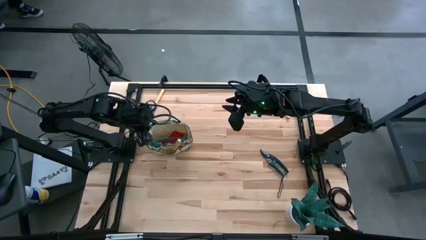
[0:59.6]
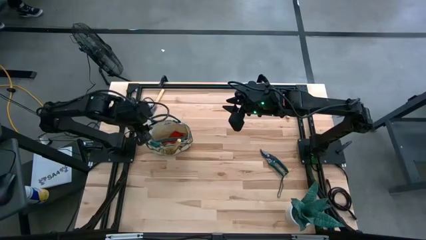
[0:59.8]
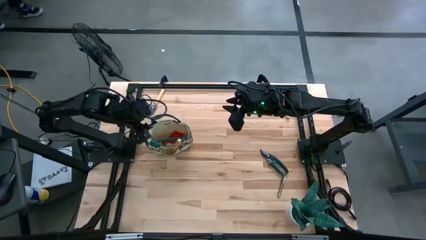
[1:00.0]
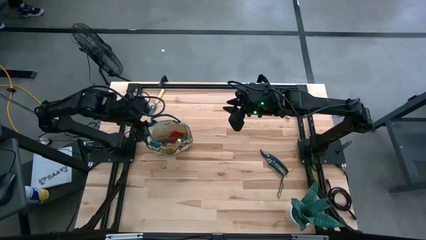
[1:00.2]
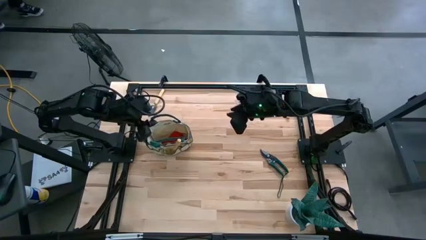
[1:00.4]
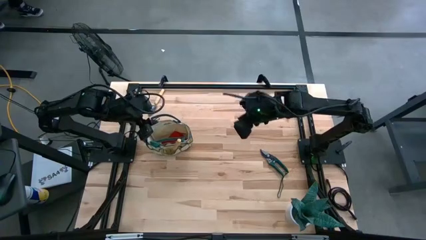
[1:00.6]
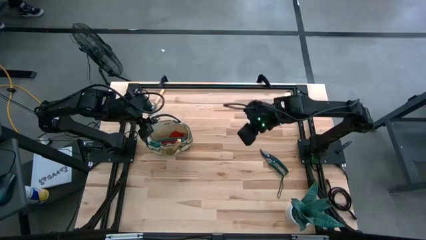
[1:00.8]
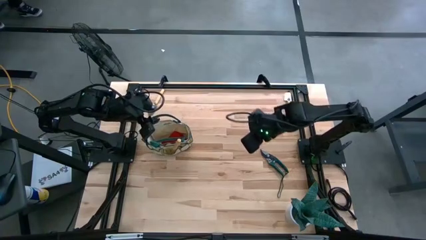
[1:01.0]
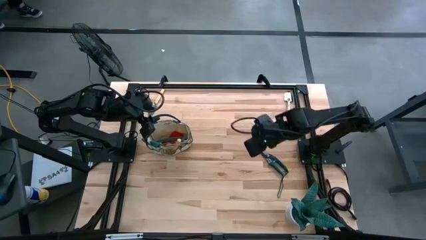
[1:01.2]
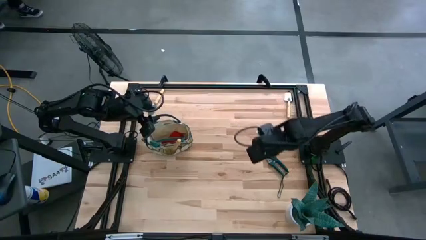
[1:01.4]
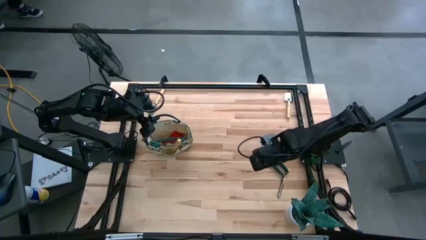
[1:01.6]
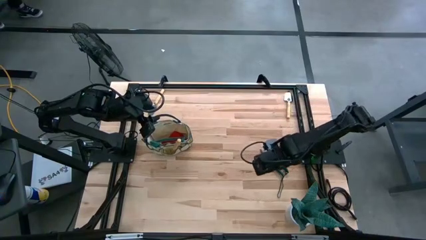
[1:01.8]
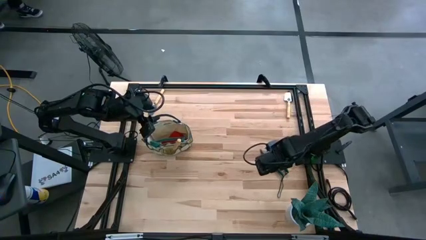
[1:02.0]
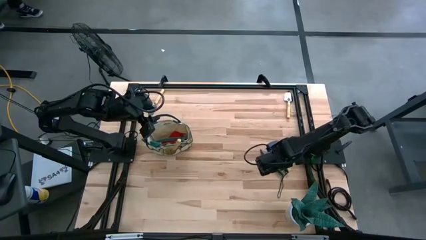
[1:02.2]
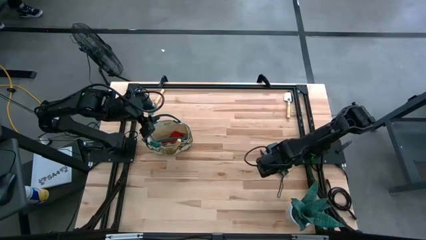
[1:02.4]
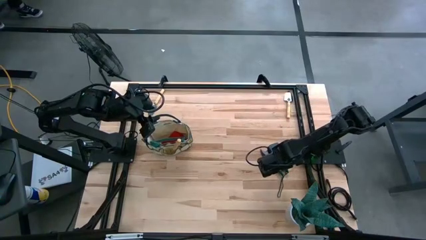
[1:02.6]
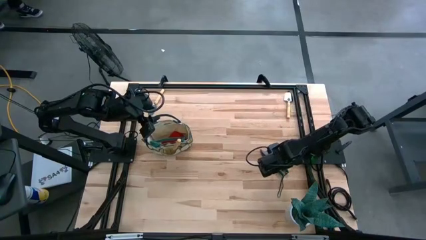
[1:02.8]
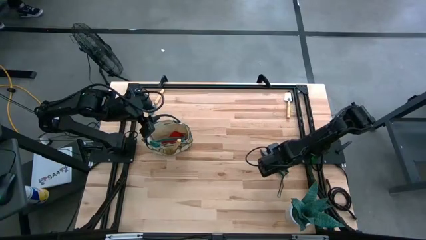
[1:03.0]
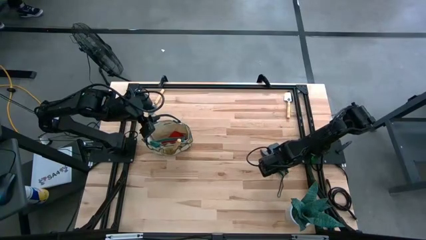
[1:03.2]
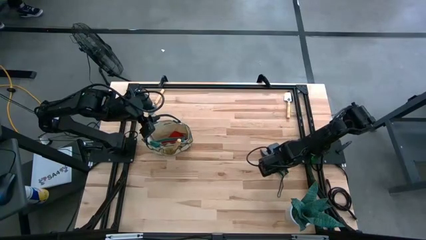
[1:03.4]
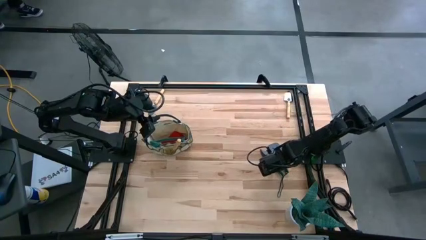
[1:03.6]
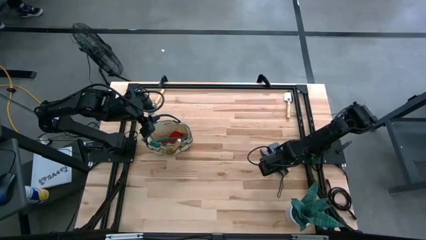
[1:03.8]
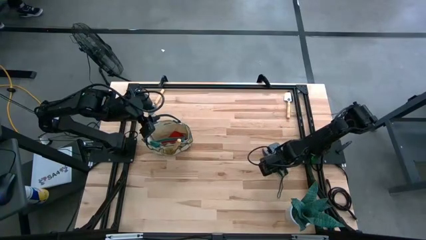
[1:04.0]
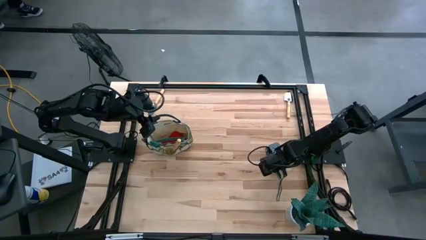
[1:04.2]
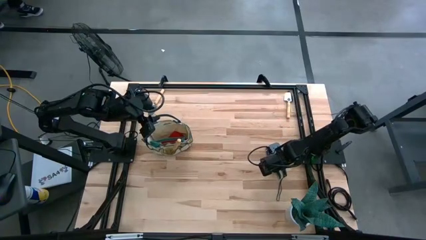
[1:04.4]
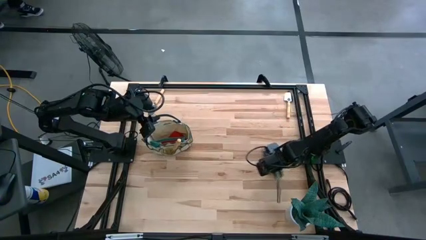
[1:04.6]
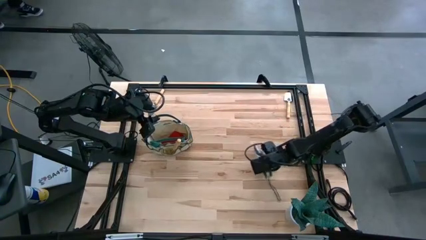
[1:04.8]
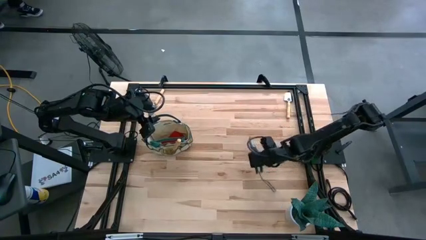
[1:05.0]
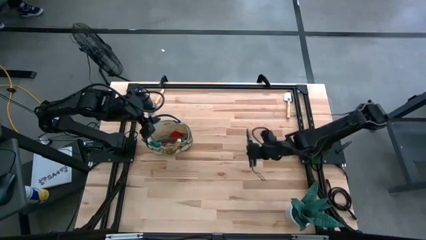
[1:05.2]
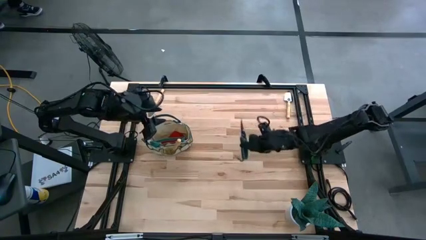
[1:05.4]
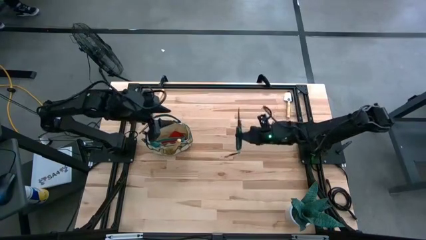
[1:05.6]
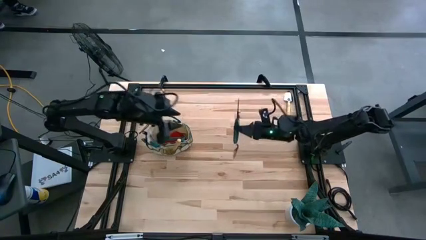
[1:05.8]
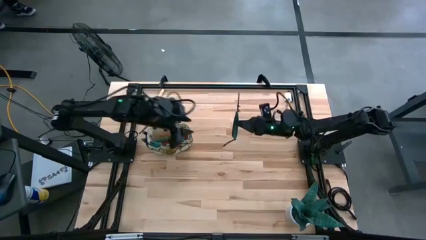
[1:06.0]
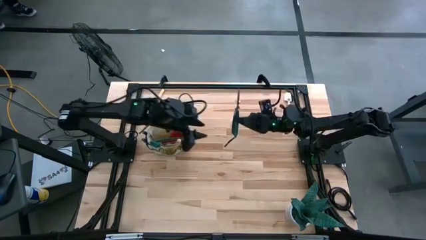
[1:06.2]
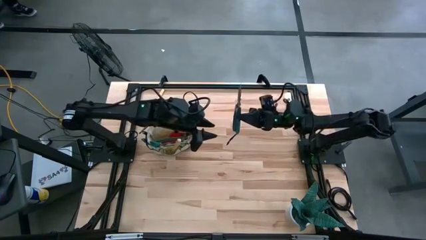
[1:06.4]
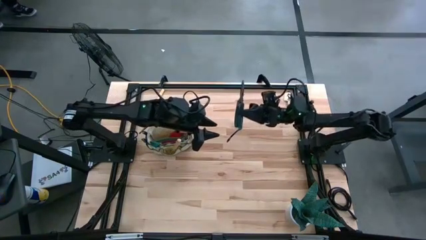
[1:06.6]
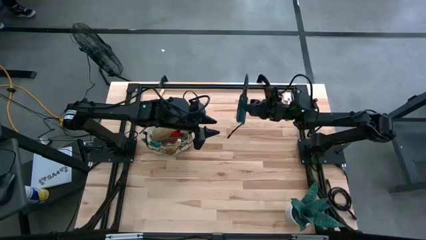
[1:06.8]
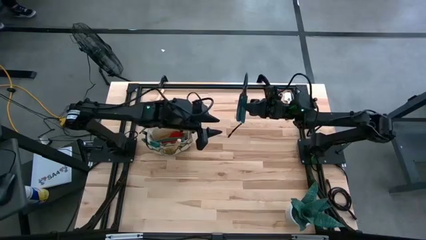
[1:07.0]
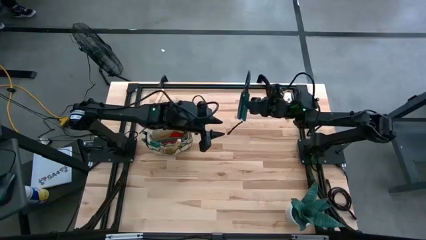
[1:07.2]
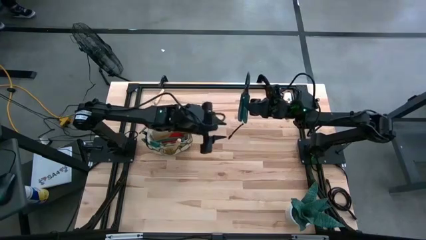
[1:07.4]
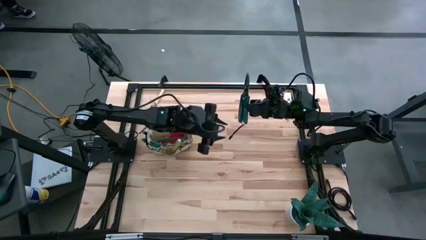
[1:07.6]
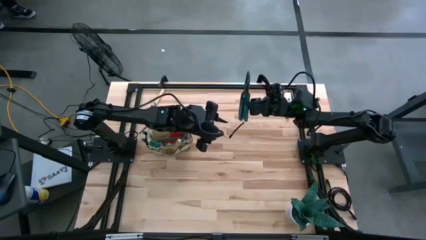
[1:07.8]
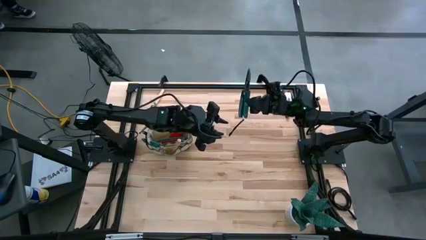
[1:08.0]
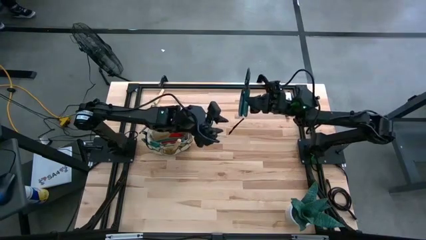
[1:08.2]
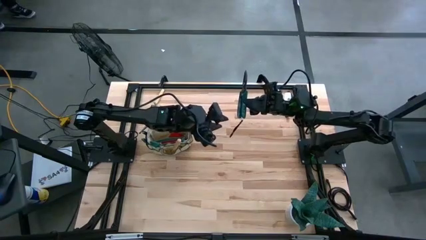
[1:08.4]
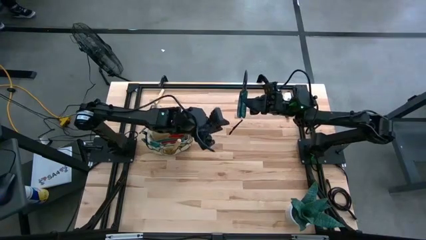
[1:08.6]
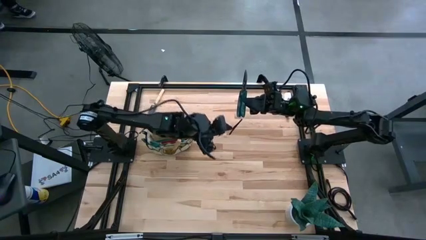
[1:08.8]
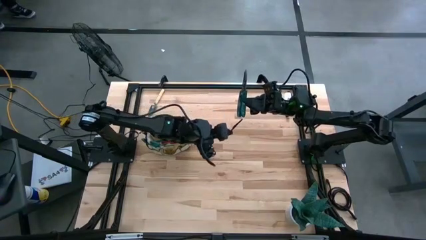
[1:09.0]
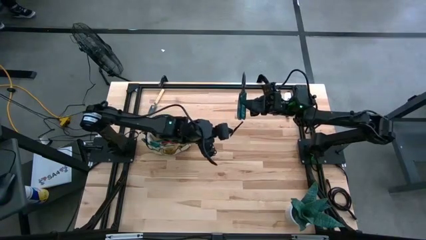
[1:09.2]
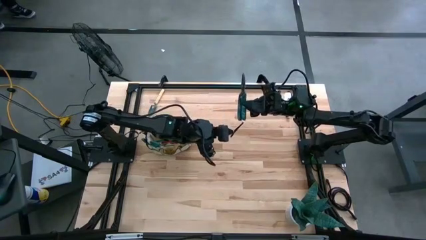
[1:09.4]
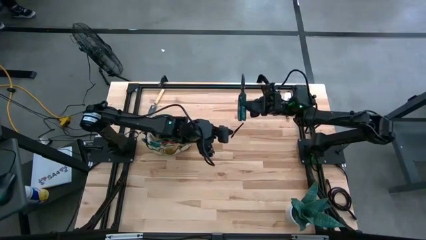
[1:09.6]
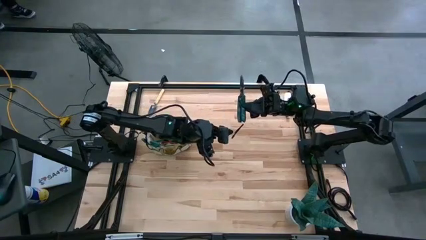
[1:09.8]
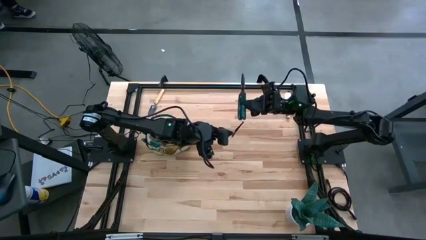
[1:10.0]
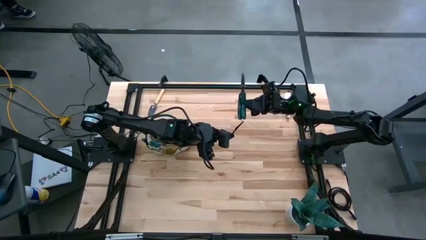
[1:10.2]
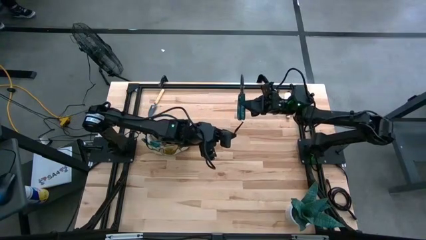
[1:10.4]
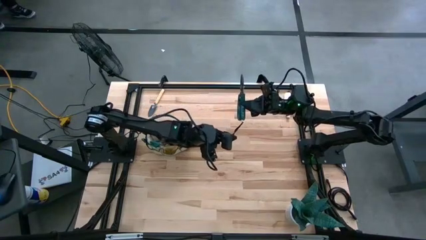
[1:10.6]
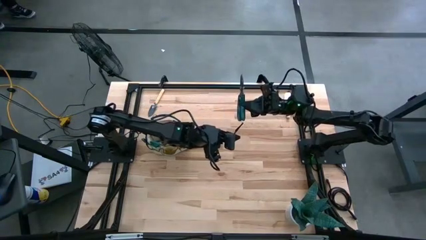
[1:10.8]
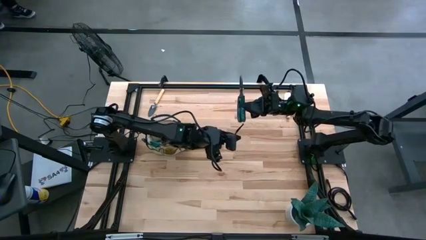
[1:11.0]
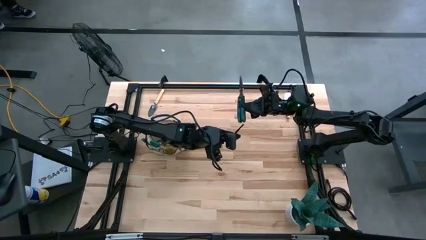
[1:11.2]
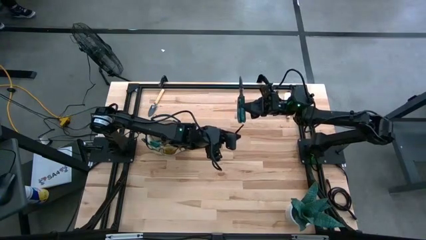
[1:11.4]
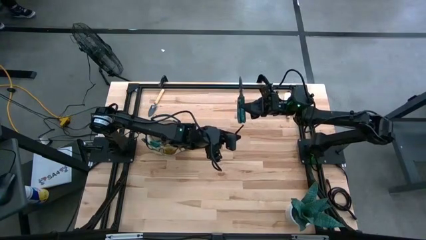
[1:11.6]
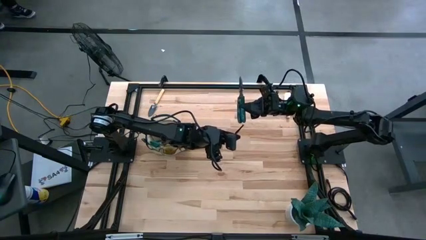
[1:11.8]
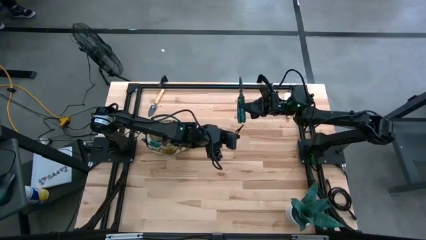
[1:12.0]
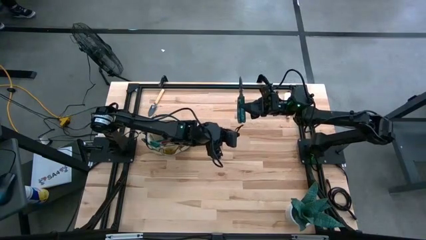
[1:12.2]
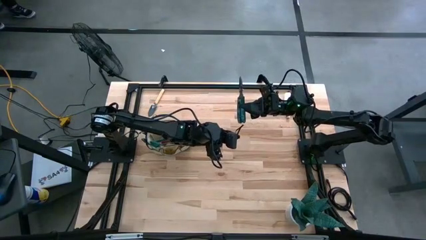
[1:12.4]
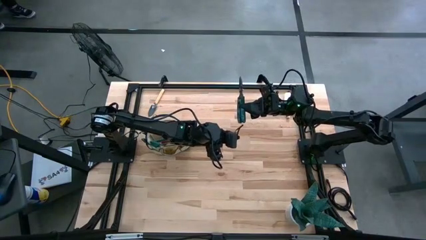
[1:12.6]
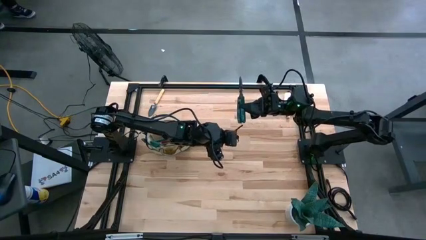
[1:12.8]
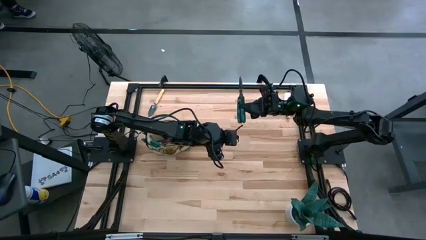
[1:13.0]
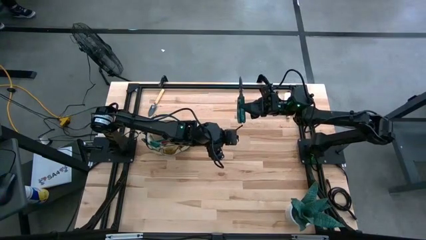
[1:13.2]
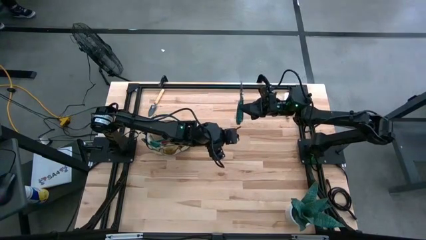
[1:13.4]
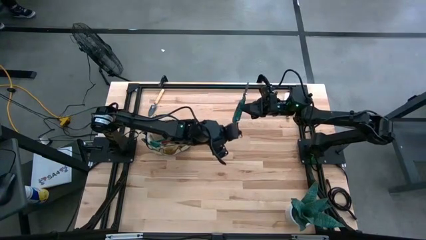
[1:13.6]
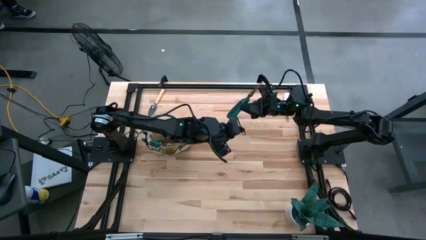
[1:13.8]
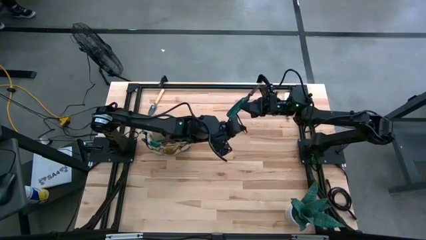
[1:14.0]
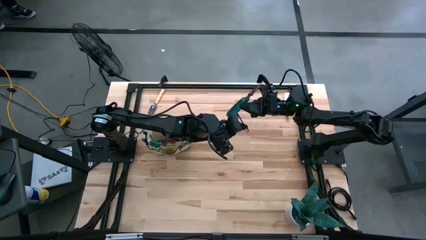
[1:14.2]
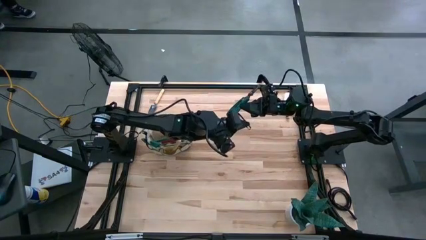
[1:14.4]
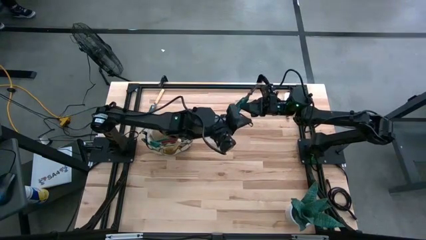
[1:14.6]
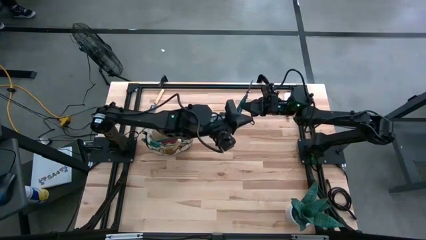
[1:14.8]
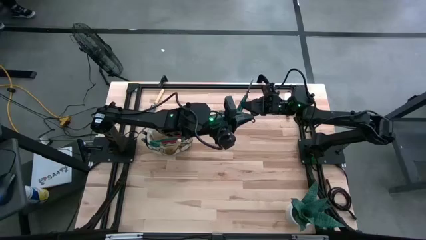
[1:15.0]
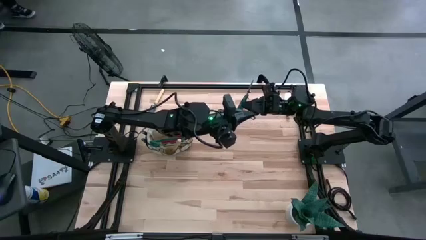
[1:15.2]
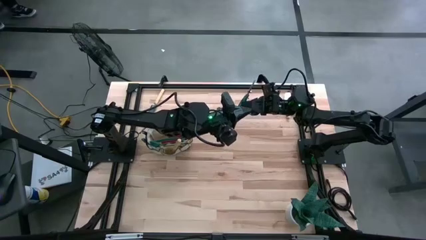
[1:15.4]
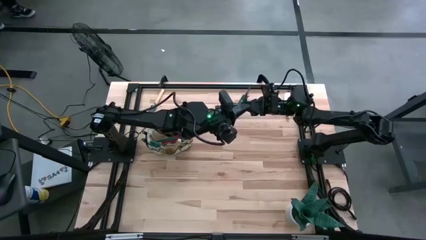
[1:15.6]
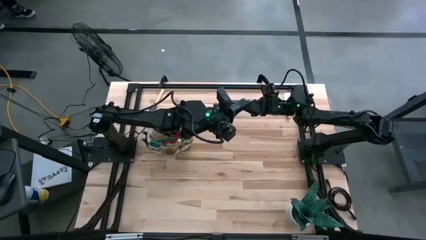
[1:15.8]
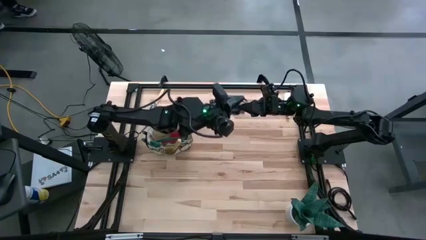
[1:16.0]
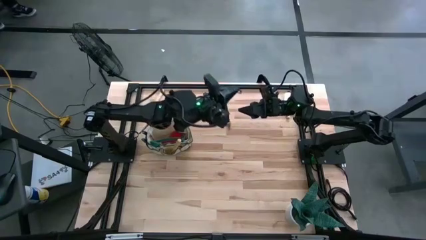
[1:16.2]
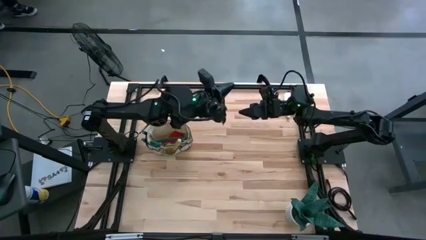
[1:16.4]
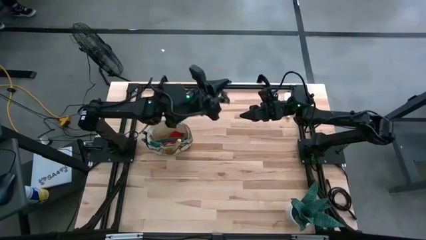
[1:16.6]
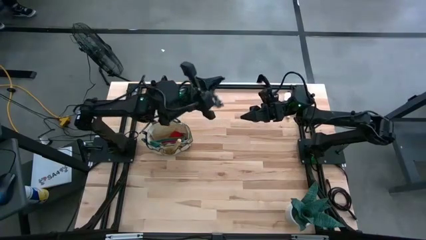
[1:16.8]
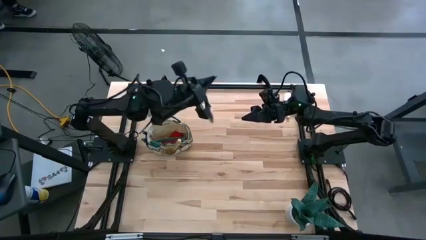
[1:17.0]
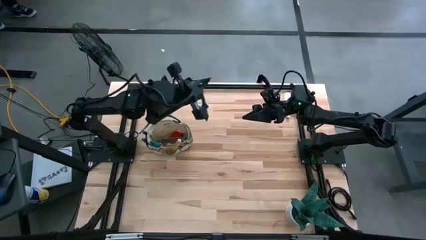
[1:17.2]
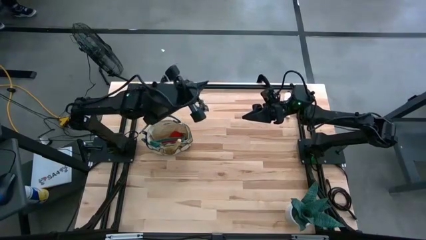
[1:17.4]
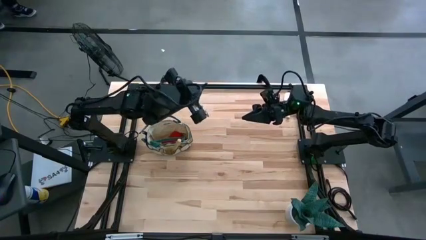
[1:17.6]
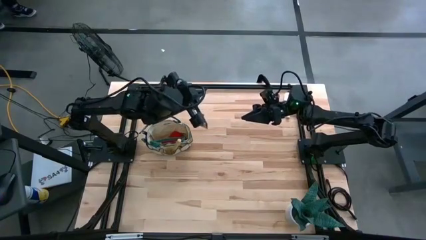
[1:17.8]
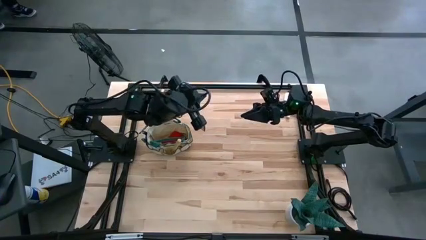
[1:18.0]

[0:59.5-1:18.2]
Task: Pick & Place Garden tools in Gardening bag
Put the green shear scissors into the white gardening bag
